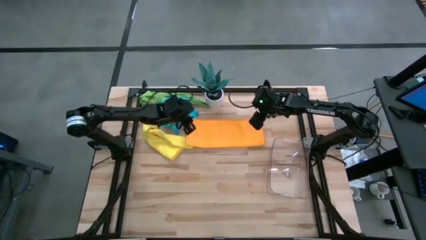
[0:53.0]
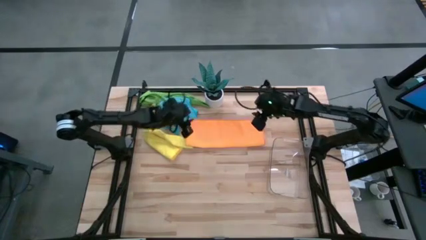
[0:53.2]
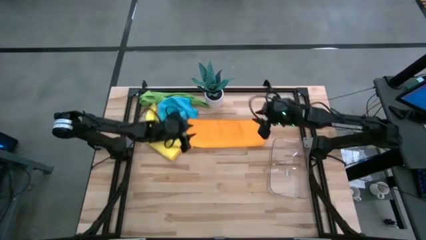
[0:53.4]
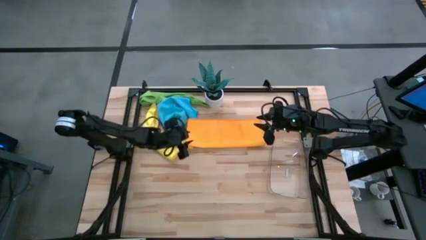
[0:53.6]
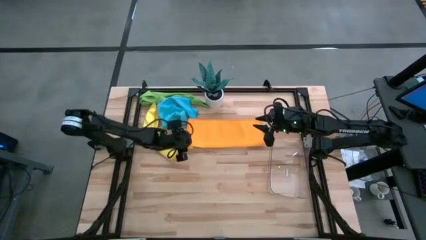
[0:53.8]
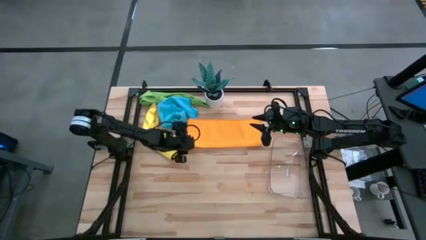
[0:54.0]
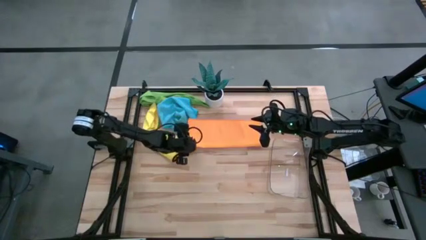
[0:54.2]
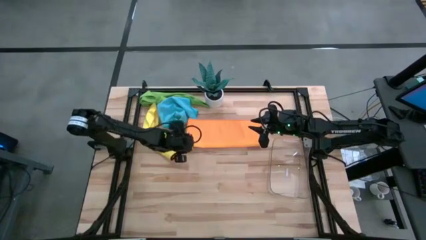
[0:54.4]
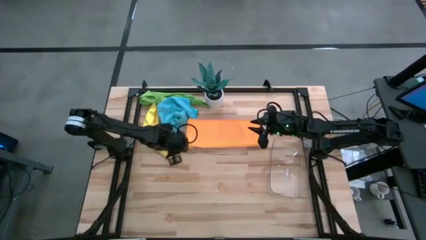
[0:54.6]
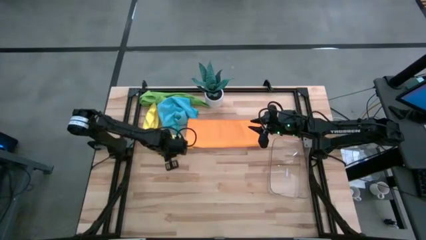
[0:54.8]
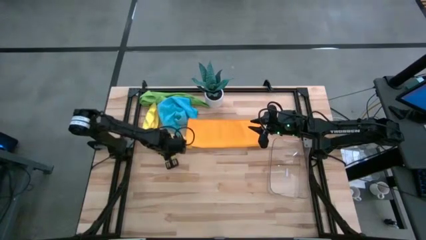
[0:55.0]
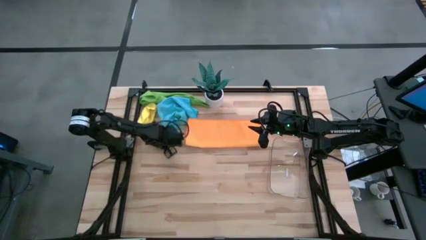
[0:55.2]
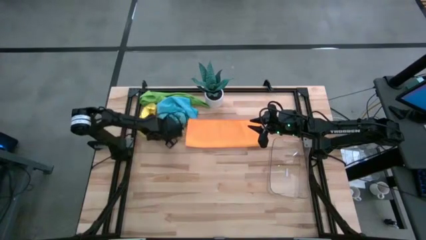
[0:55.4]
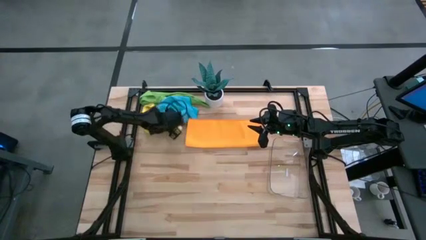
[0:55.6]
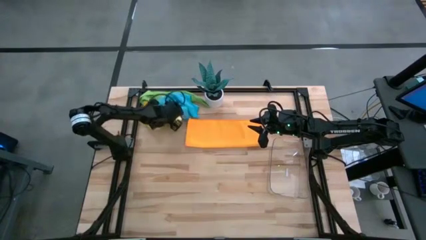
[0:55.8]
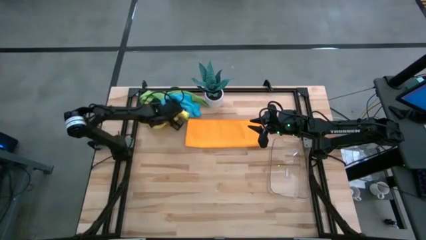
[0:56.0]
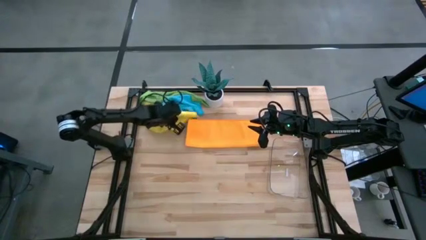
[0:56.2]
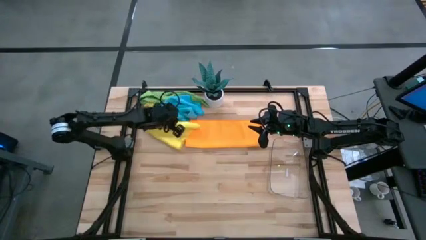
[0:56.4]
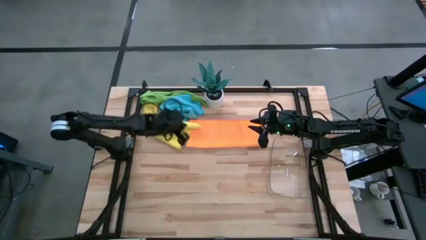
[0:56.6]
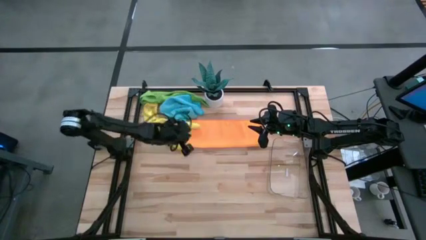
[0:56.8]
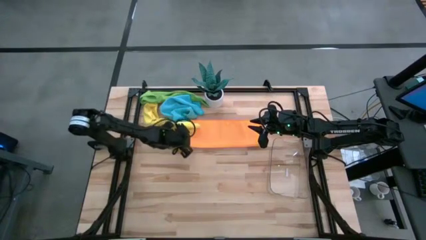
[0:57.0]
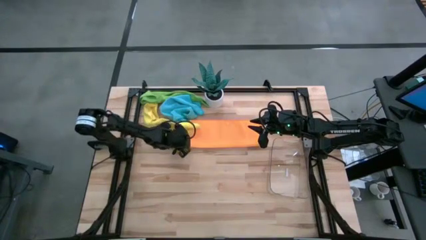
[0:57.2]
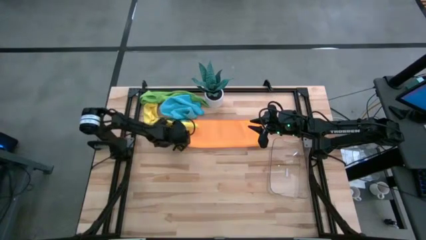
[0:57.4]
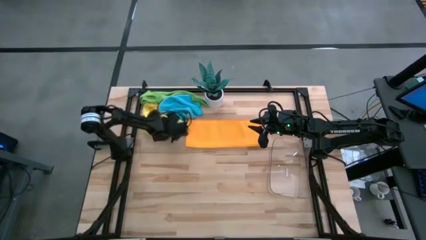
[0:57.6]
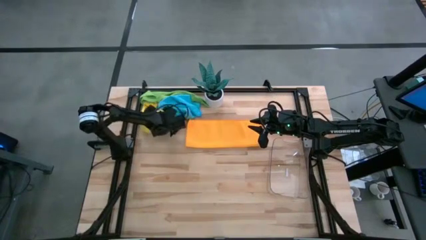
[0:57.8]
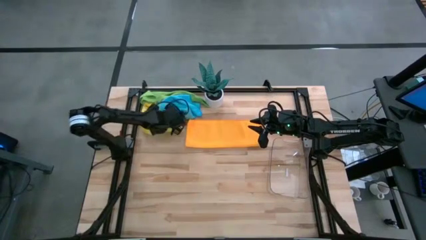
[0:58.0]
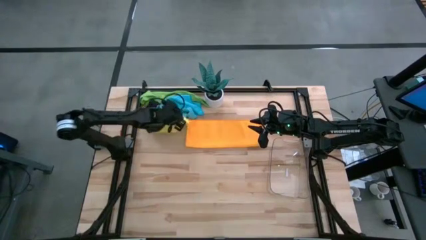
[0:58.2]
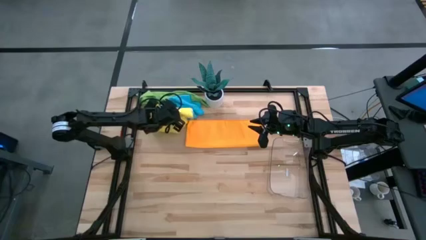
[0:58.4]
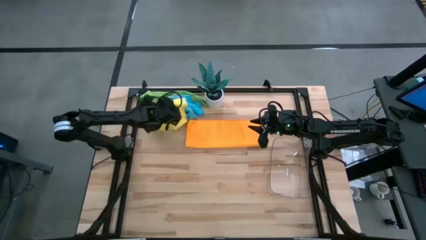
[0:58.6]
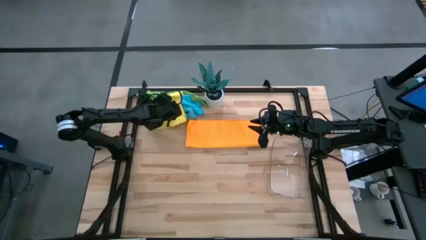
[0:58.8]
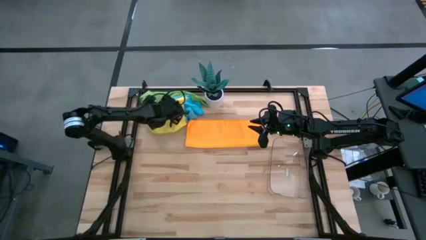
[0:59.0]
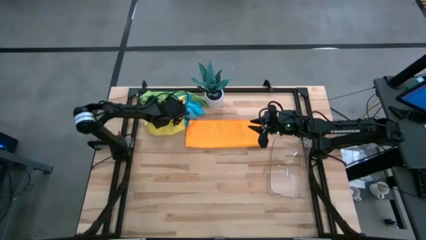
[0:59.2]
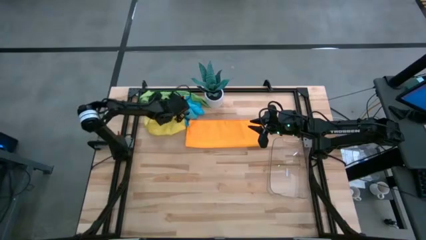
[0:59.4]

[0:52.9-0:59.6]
Task: Roll microfiber towels into tight, uniform cylinder then place into a basket
Adjust the yellow microfiber cloth

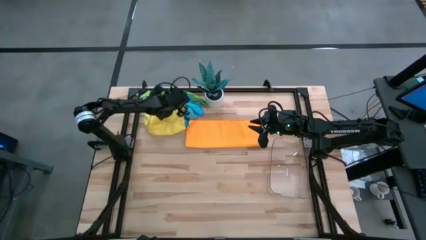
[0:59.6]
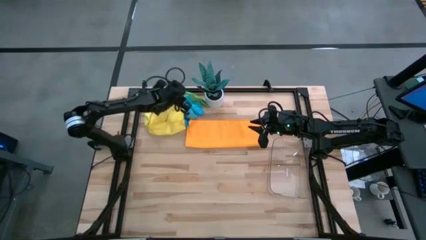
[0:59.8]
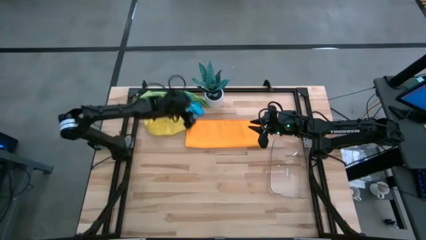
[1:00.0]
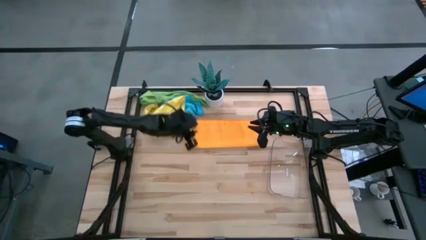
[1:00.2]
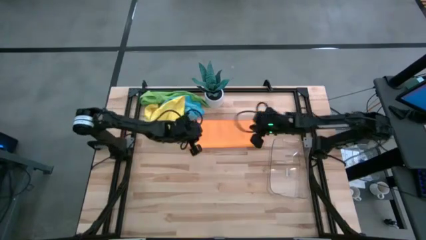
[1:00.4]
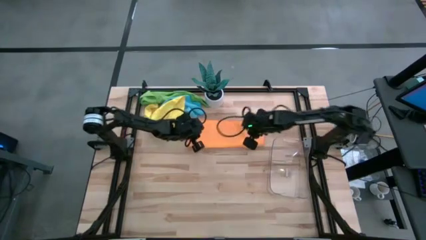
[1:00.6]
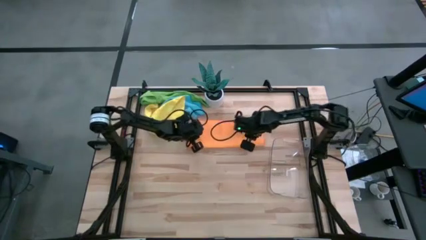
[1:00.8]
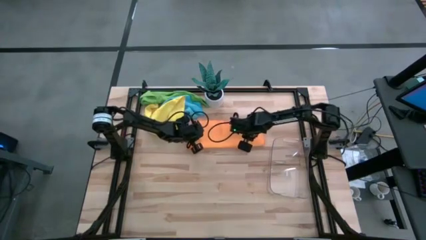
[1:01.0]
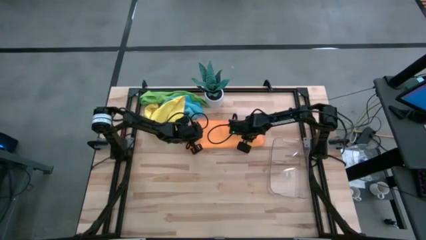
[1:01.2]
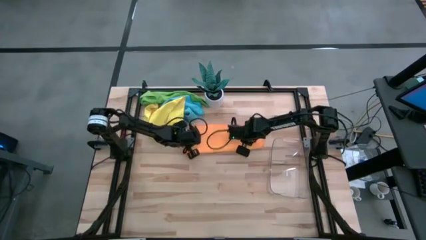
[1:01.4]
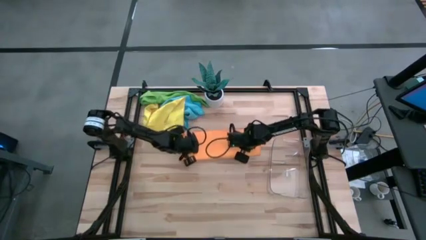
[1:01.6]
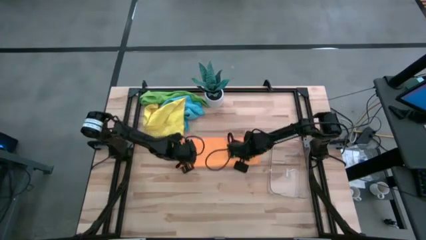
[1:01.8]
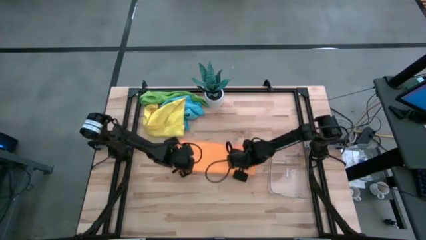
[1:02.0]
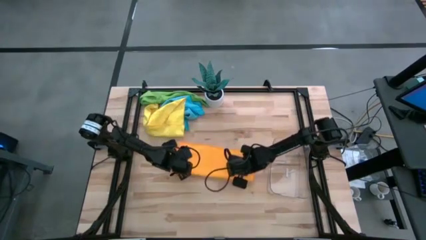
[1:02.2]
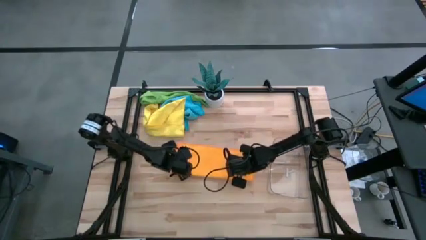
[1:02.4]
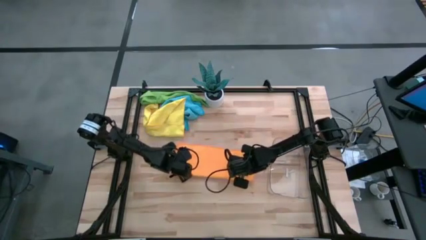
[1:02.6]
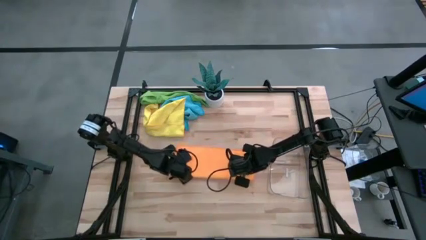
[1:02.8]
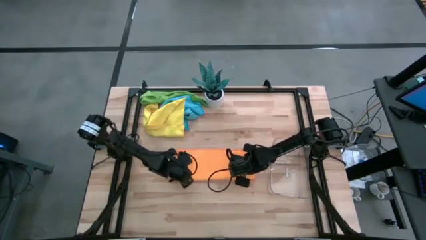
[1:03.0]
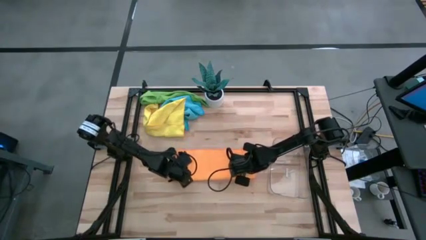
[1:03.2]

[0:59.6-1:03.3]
Adjust the orange microfiber cloth

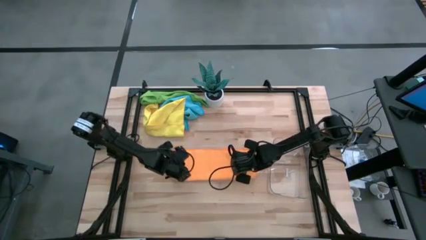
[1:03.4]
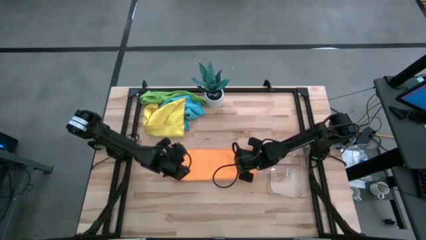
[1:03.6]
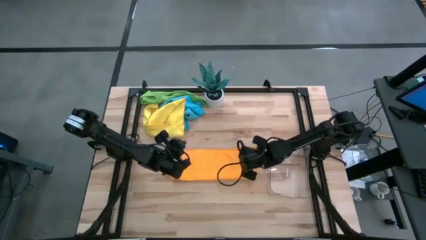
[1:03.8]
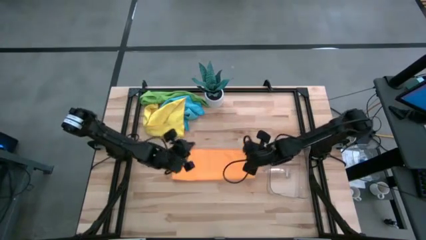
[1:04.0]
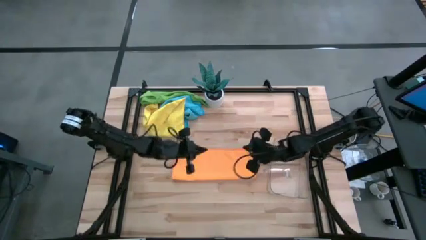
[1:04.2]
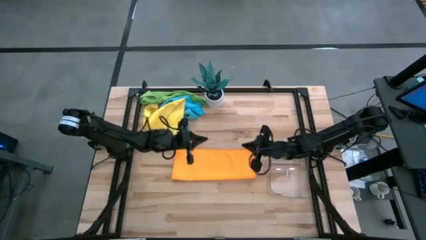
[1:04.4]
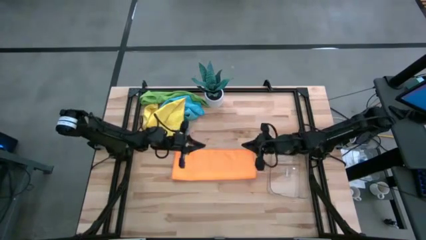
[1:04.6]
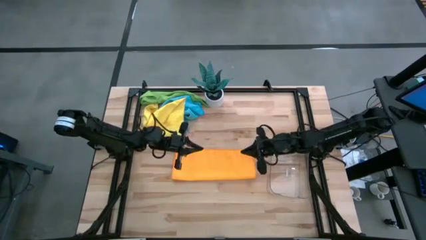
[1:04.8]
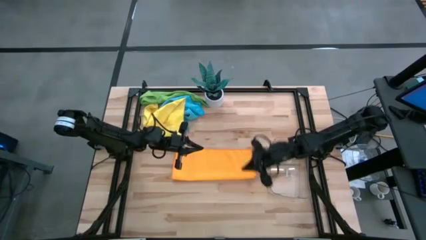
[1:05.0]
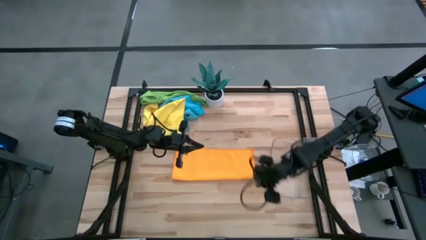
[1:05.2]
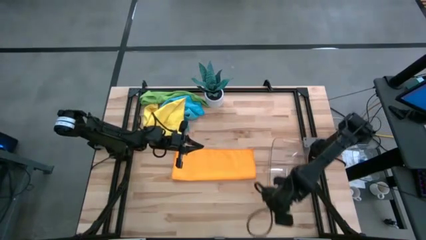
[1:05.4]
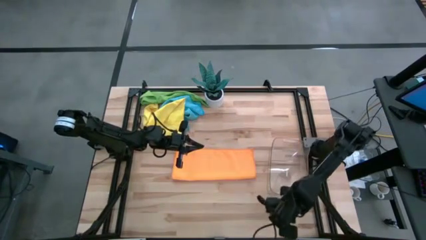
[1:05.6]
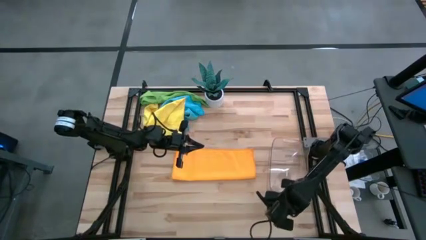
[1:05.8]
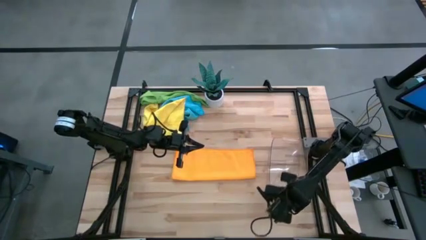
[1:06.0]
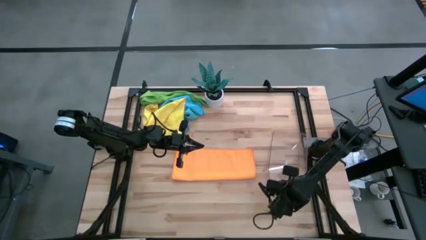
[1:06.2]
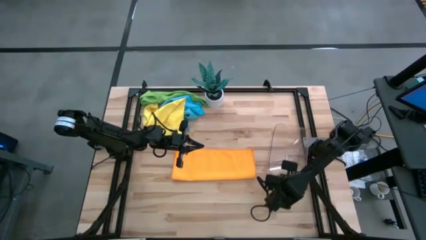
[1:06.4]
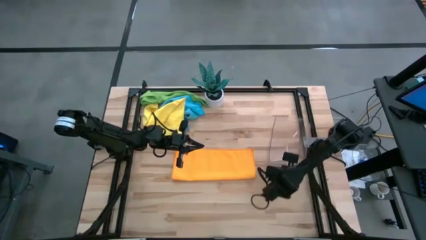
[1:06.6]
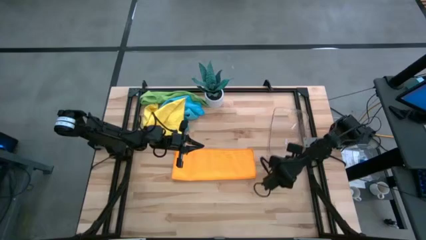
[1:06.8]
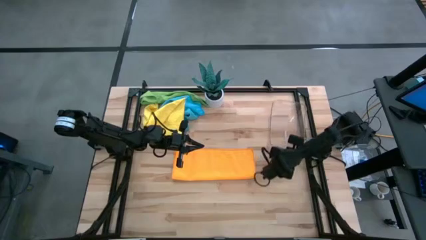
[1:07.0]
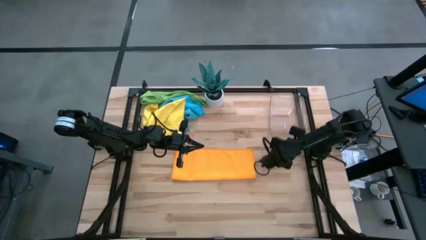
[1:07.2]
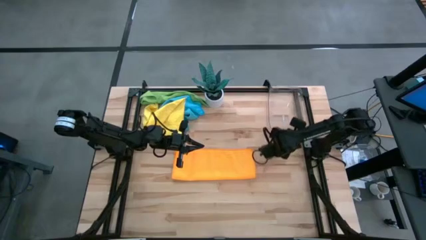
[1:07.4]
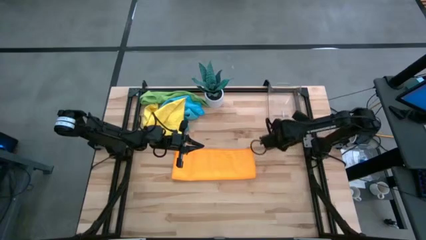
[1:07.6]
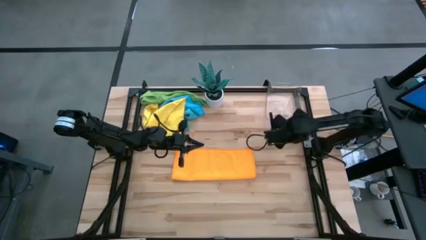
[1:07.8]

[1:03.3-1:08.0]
Move the transparent bin from middle right to the top right on the table

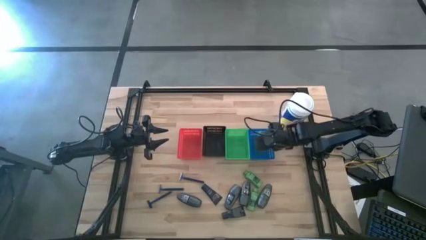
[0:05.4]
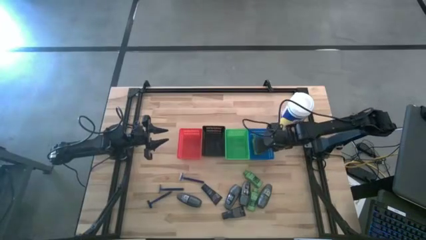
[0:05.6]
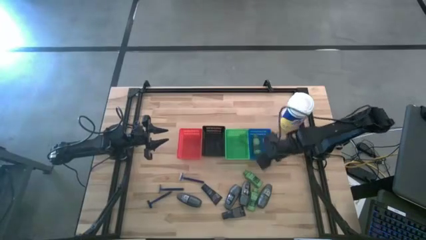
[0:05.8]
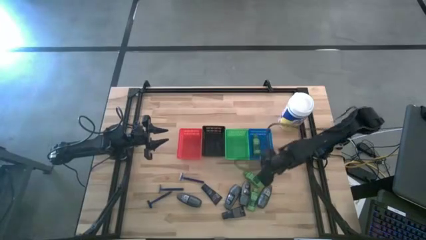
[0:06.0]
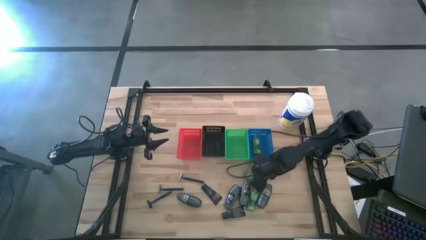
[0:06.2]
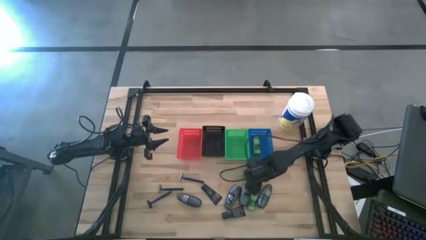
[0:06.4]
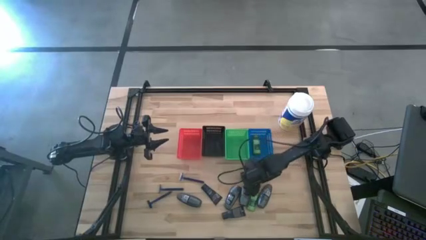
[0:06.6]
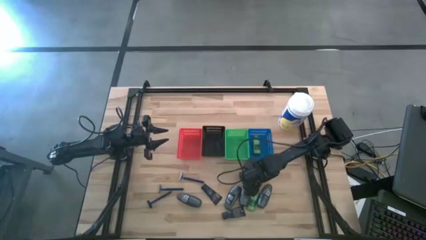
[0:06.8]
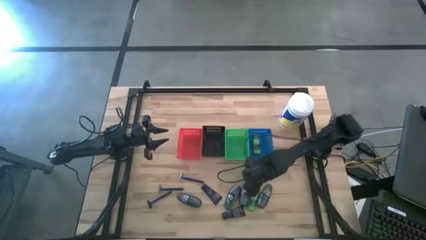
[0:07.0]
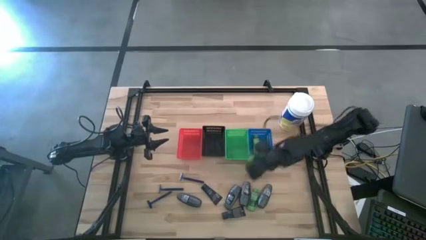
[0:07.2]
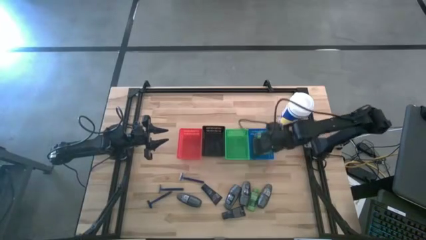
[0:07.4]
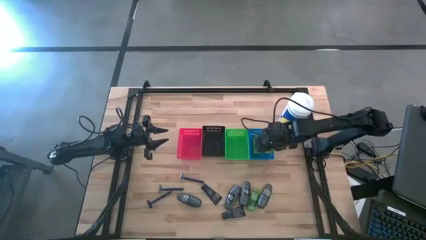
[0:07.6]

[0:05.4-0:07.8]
Task: Pick & Place Travel size toiletries
Put the green shampoo into the blue bin
